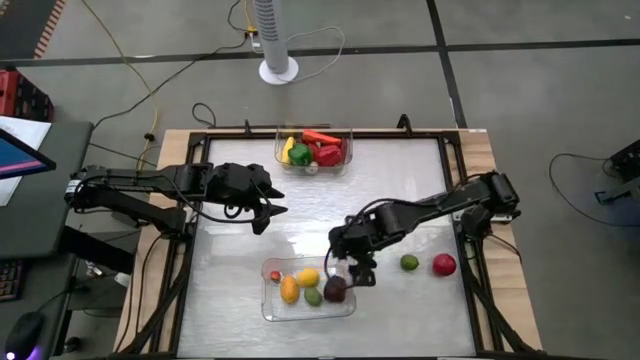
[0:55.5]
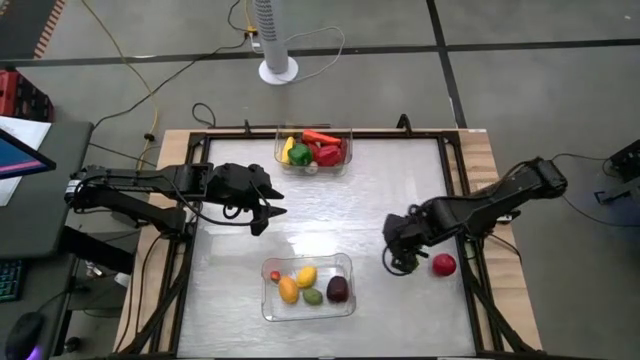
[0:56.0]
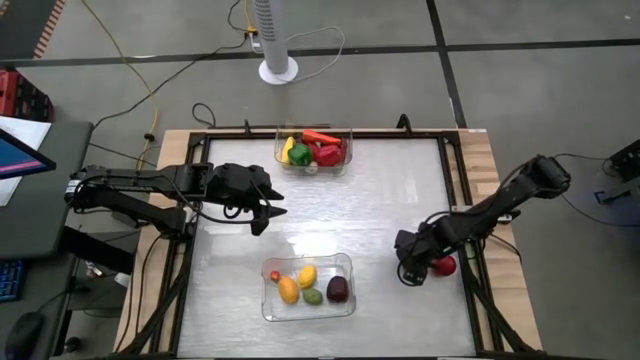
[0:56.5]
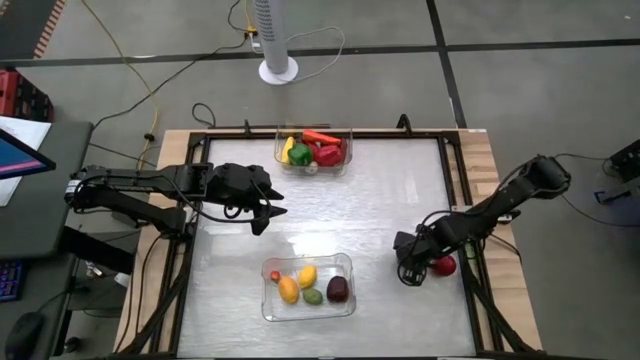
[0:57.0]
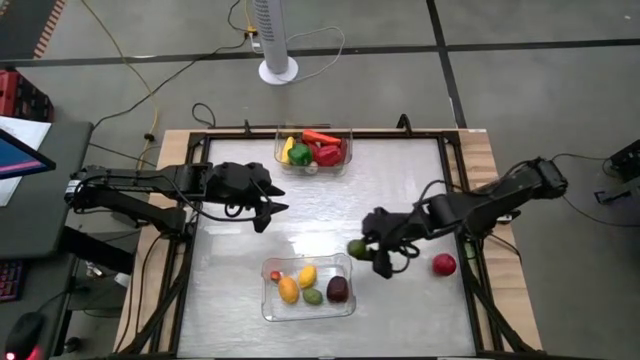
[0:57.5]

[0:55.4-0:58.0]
Task: Sort produce into baskets
Put the green lime into the bottom transparent bin

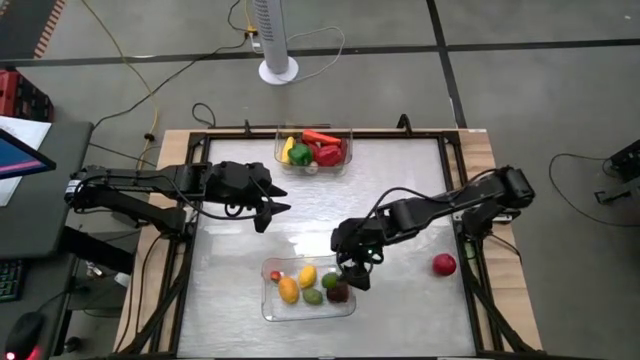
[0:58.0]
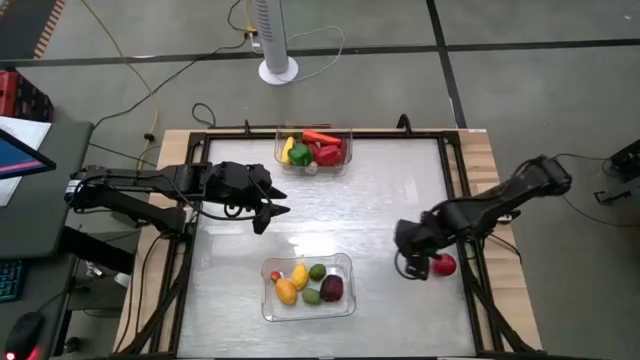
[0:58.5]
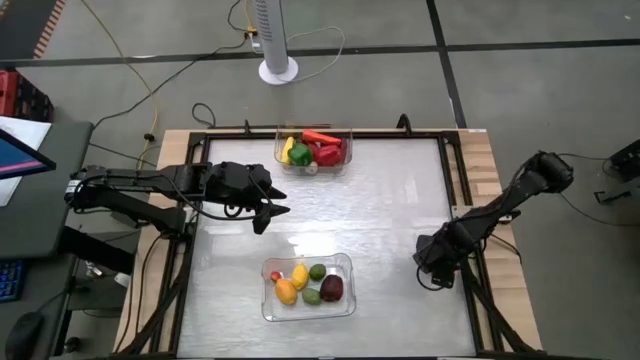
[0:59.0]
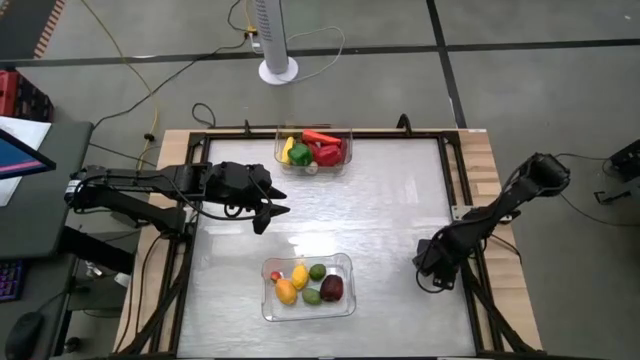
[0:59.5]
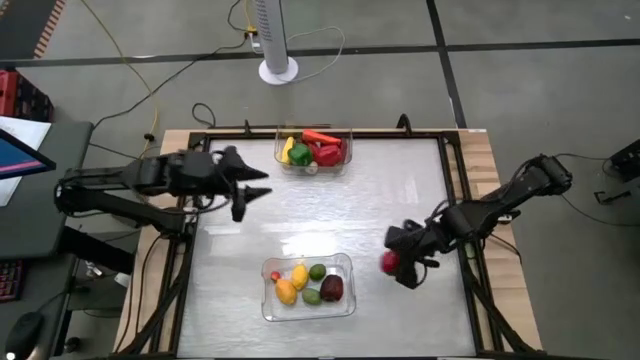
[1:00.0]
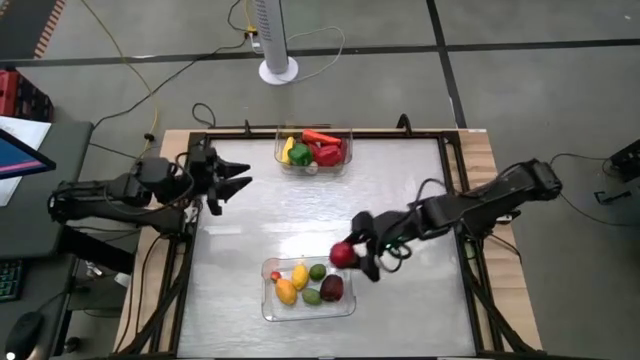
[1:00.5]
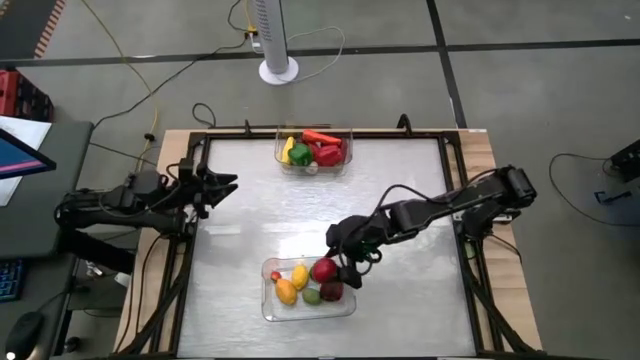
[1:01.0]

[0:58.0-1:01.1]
Put the tomato into the bottom transparent bin

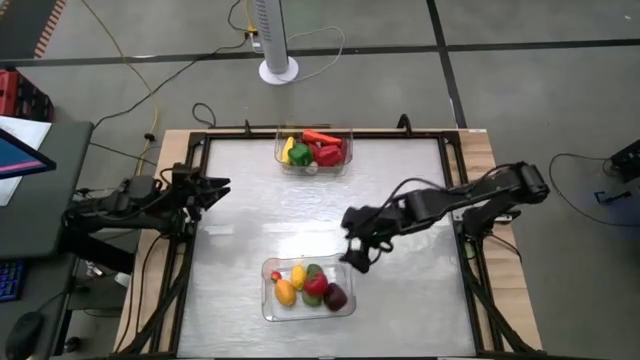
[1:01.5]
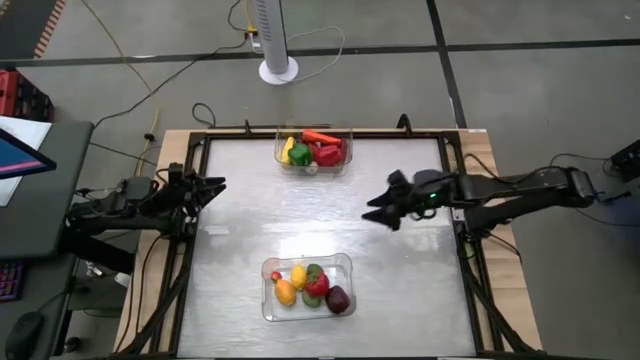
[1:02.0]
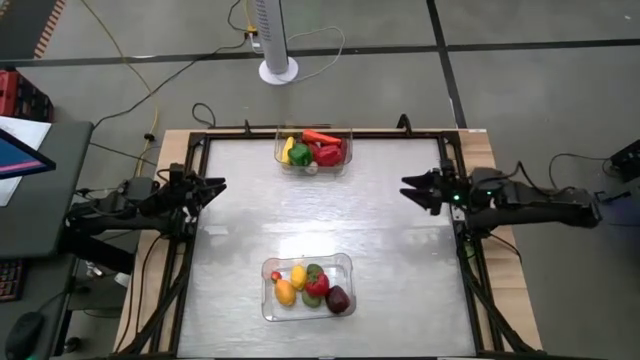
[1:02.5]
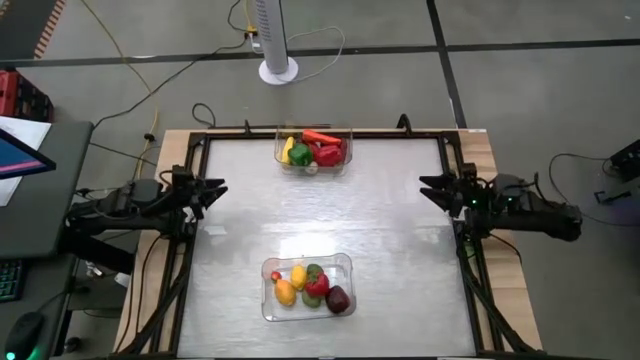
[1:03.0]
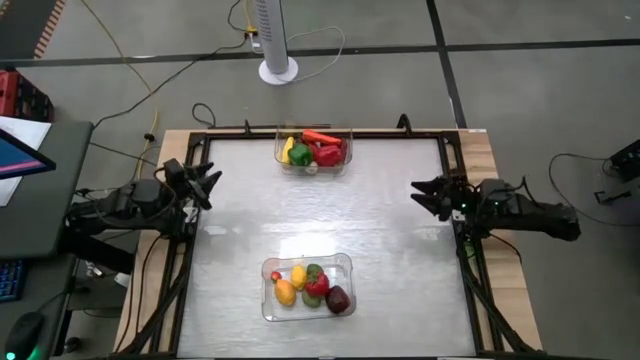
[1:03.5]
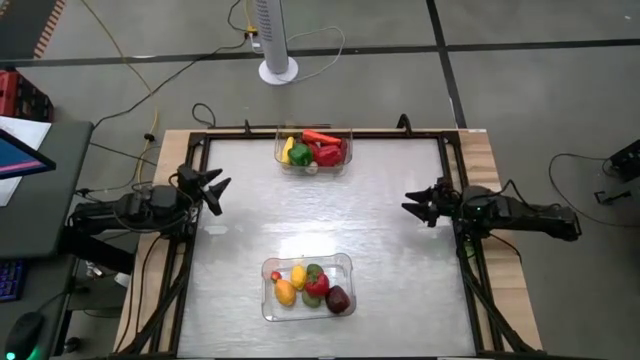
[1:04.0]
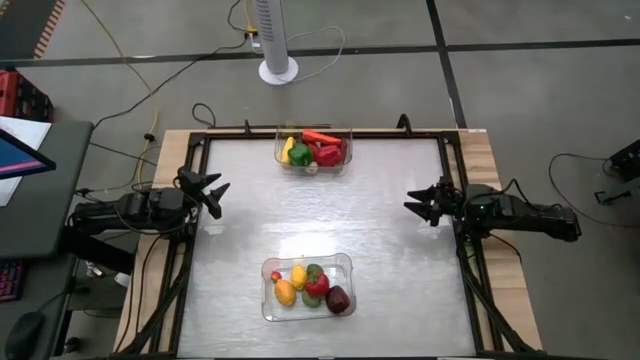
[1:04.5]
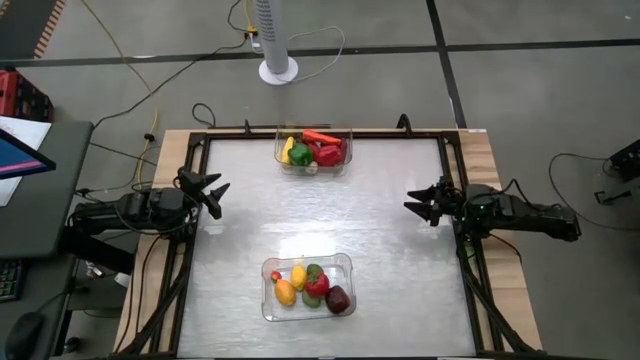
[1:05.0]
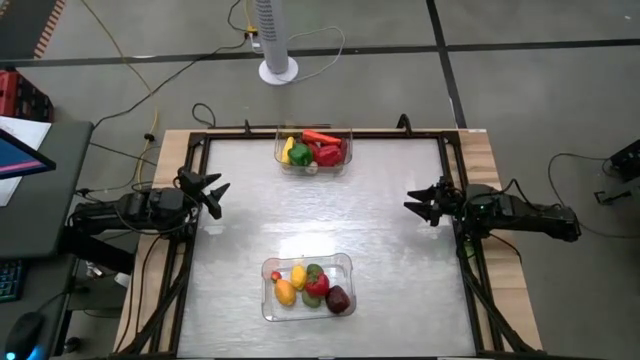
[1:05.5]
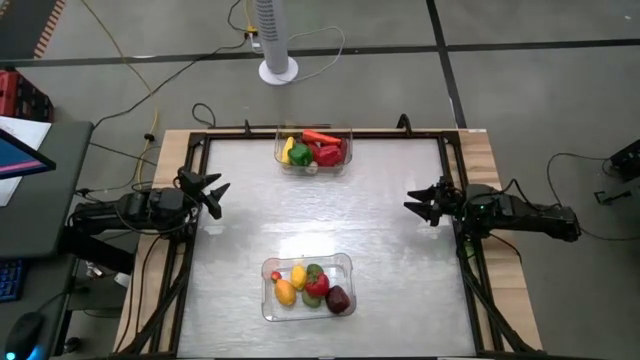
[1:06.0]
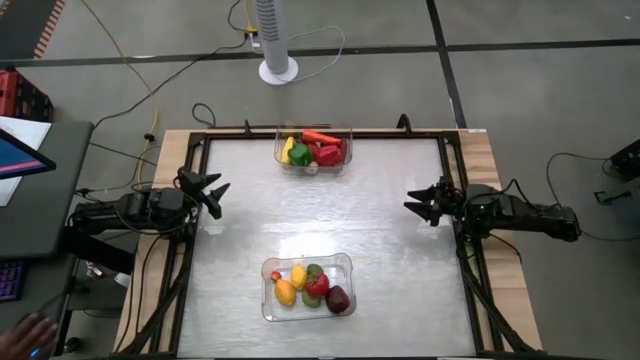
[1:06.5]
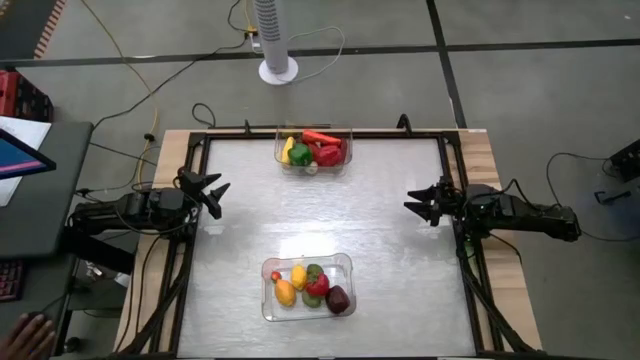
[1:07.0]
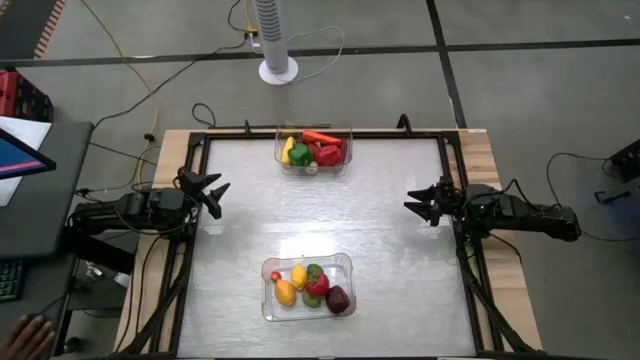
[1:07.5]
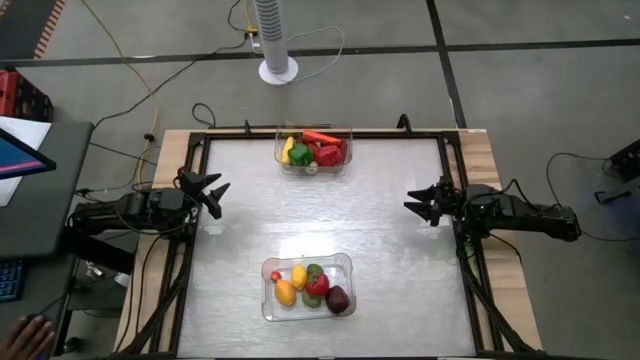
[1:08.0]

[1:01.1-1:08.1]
Return to Home Position

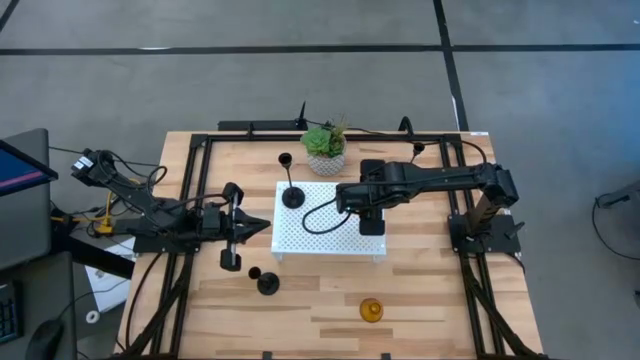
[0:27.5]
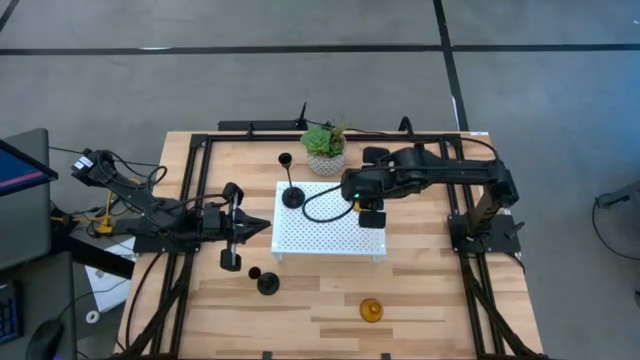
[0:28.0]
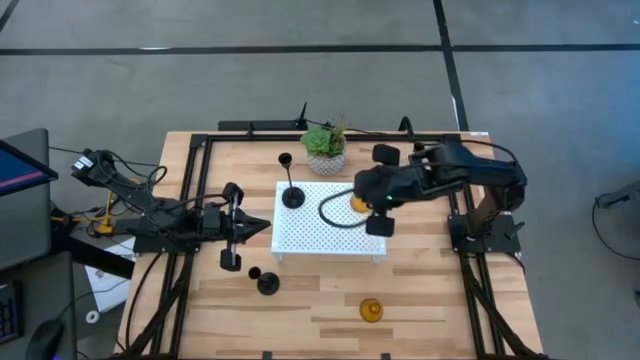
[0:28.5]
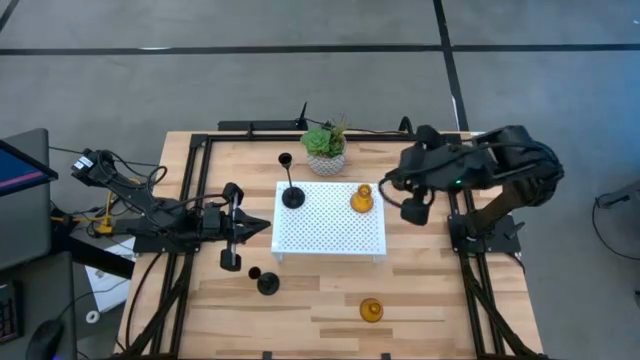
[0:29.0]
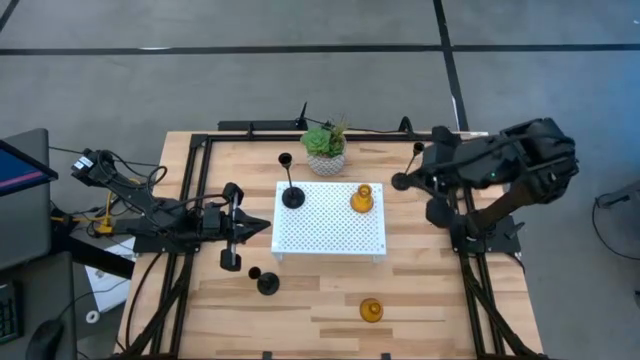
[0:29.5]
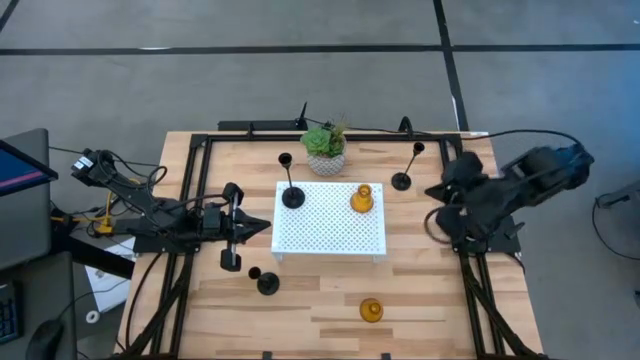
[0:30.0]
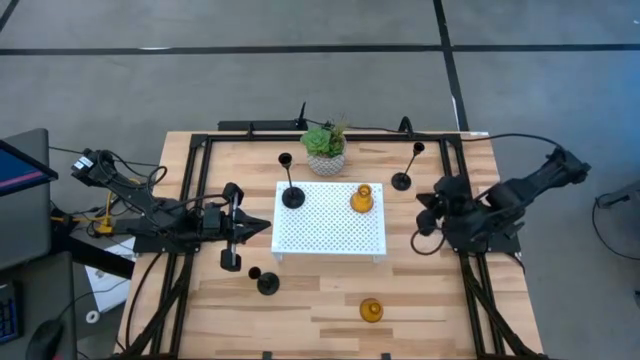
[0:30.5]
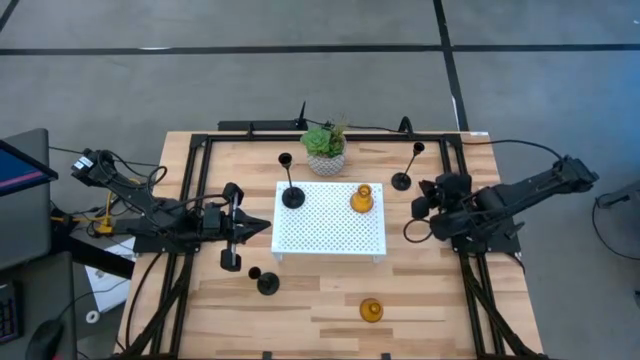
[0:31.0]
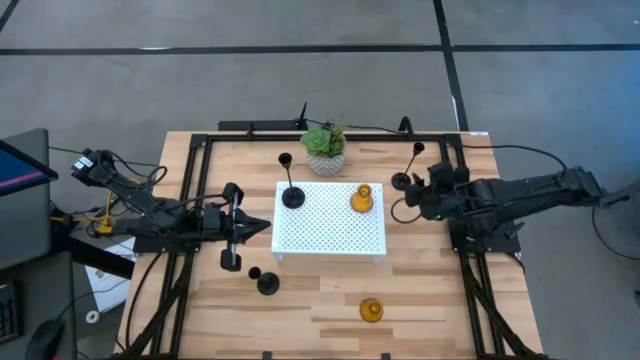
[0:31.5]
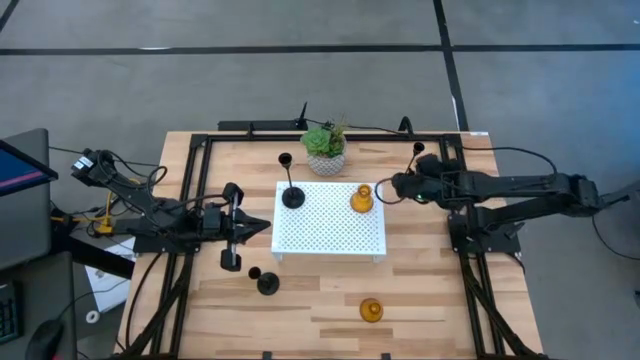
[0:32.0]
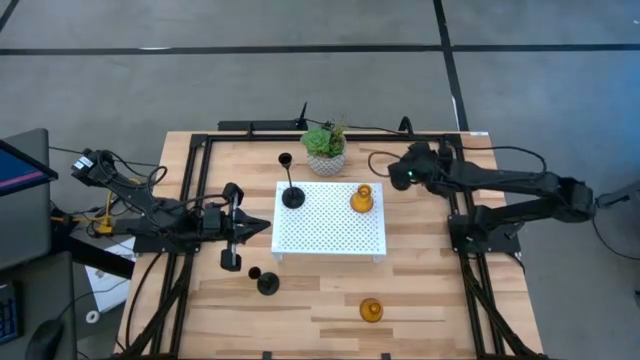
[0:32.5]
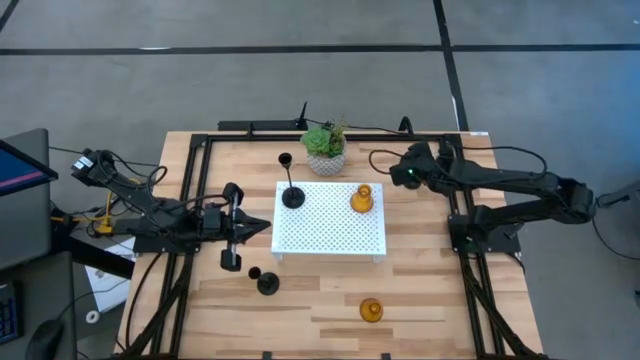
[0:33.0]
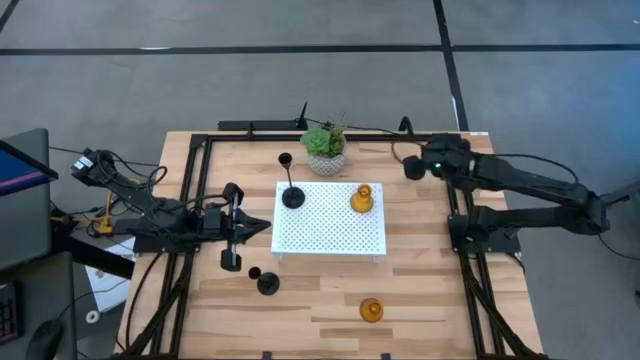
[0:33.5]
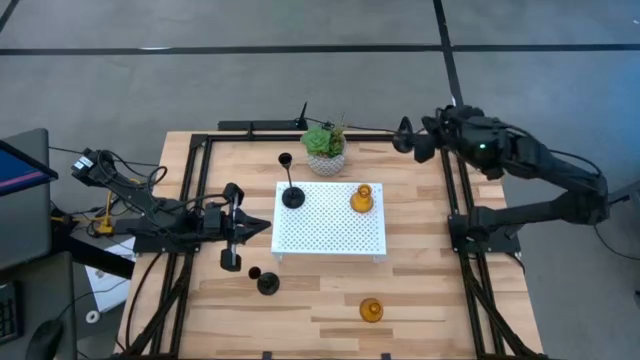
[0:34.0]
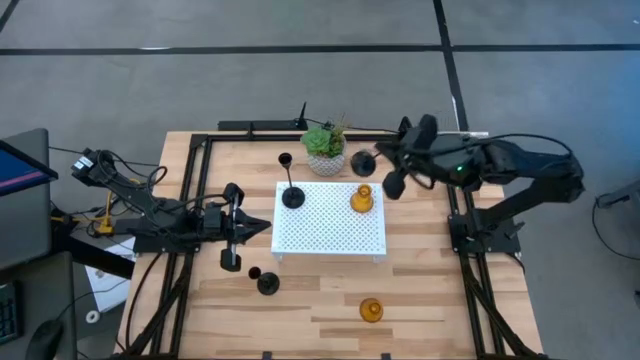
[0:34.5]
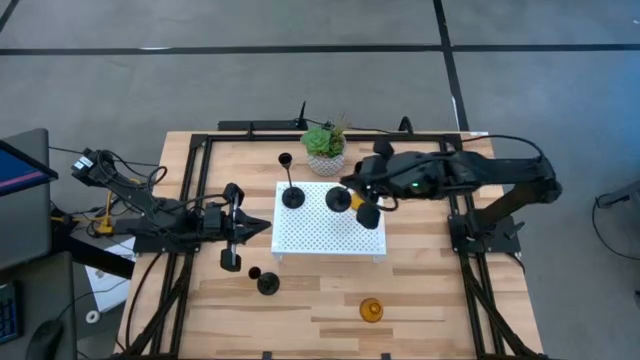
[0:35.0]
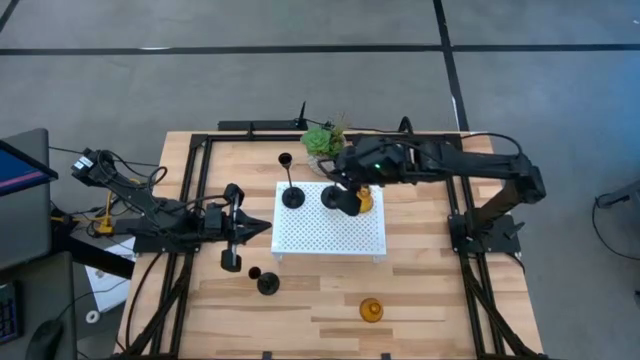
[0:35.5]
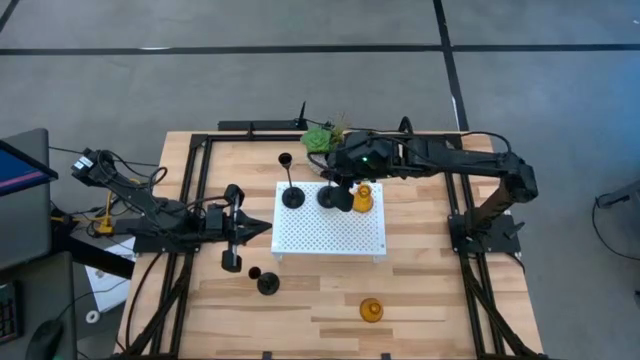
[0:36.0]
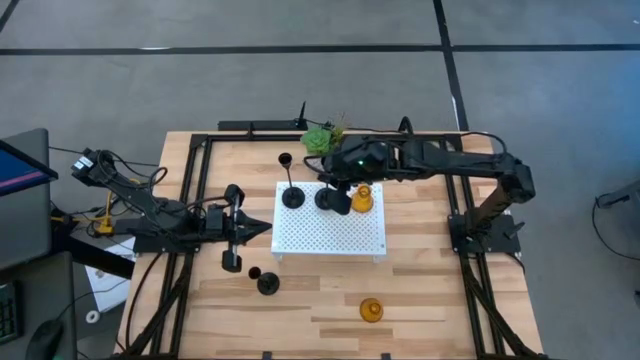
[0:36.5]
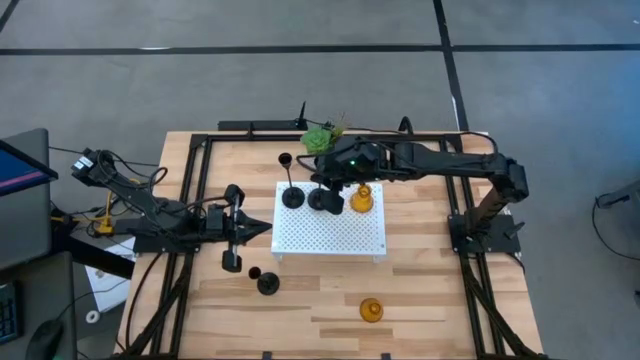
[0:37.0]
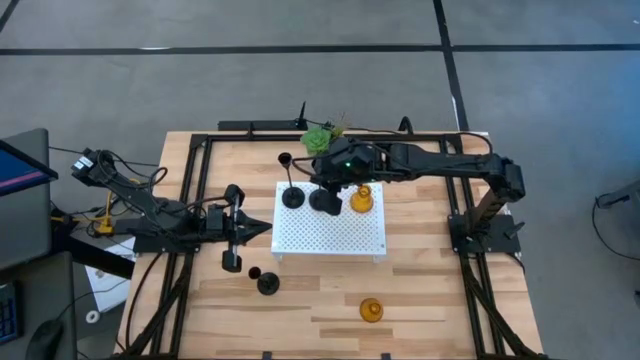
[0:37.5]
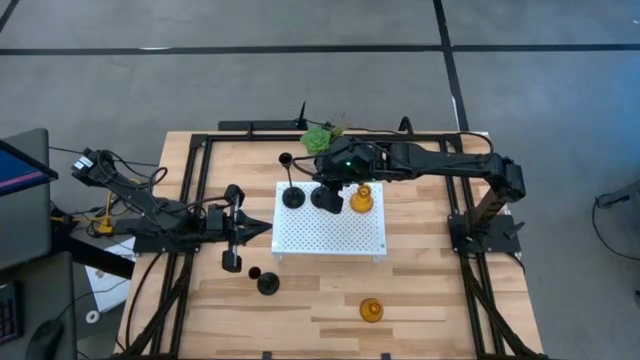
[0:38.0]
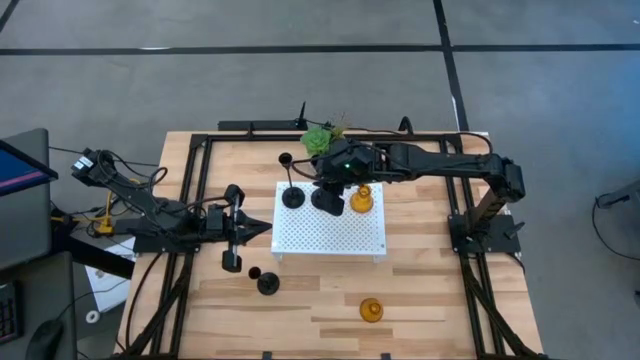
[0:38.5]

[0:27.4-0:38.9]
Task: Pick & Place candle stick holders
Put the top black candle holder on the shelf
